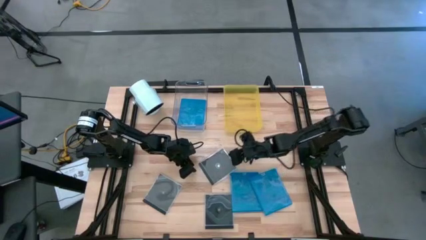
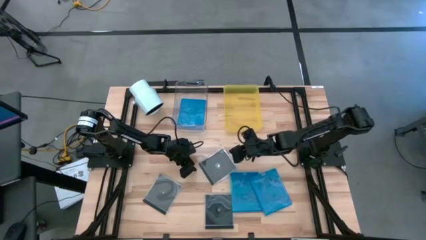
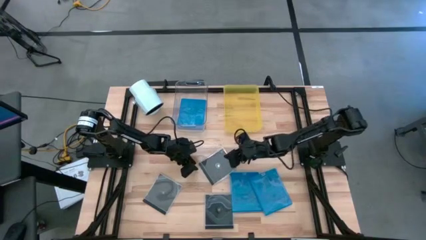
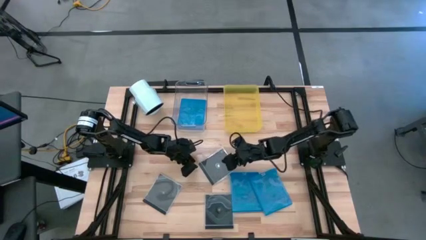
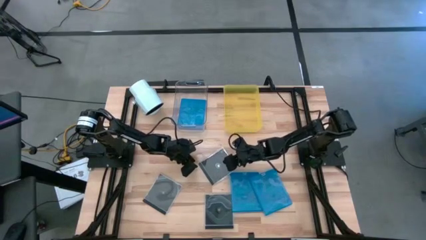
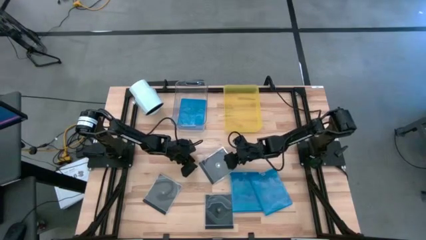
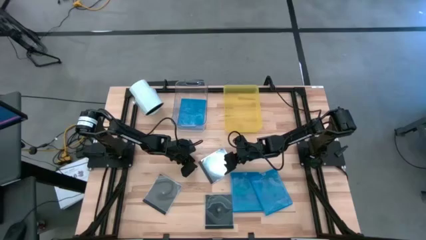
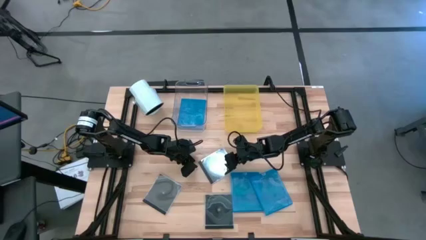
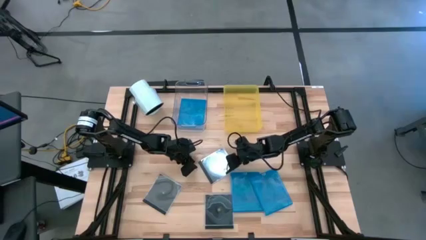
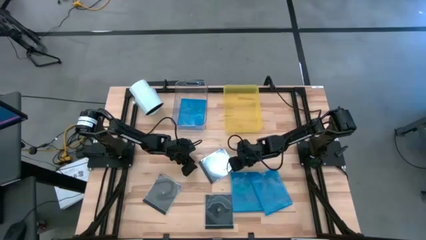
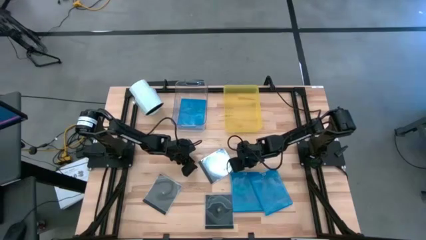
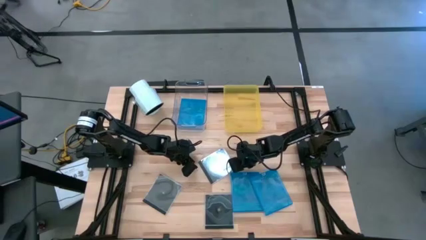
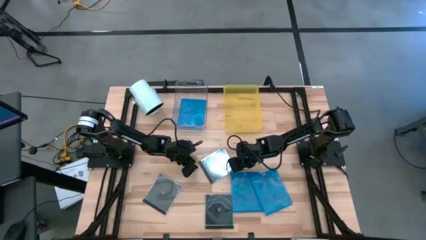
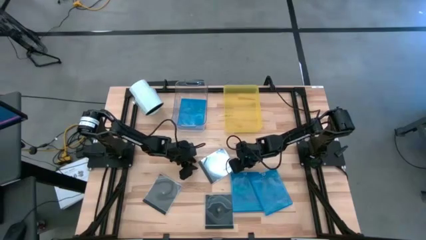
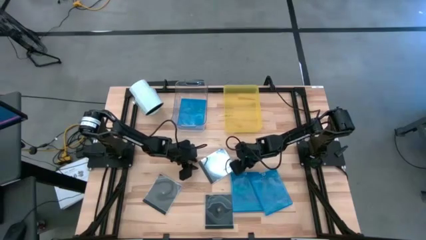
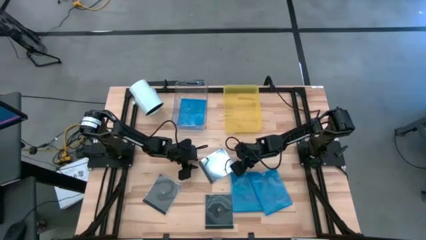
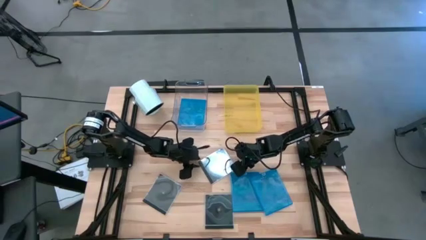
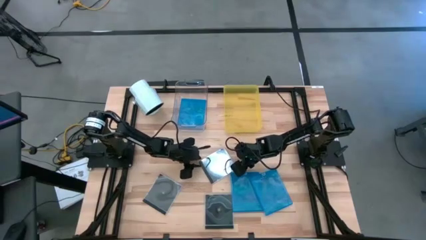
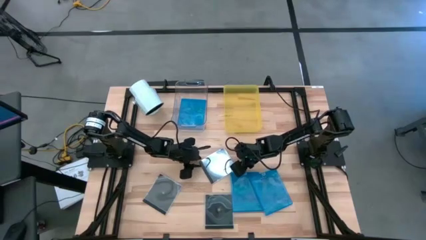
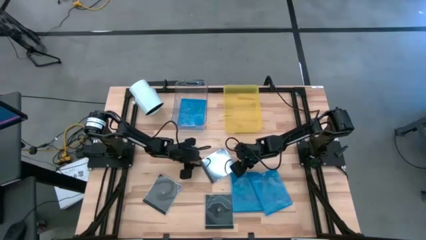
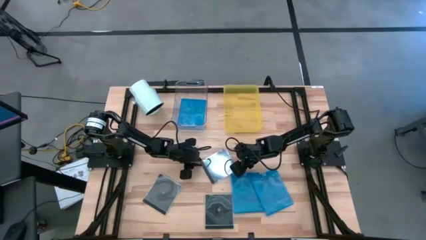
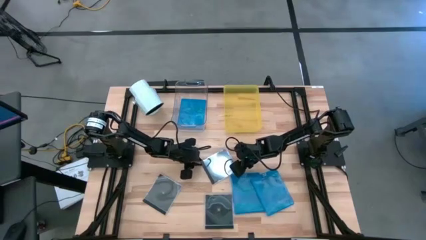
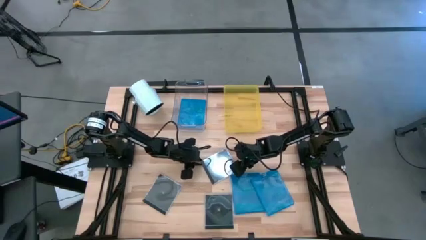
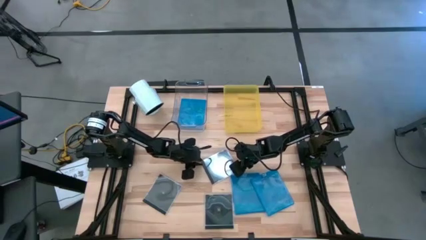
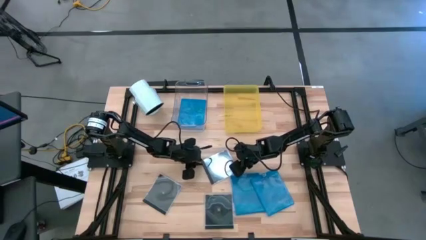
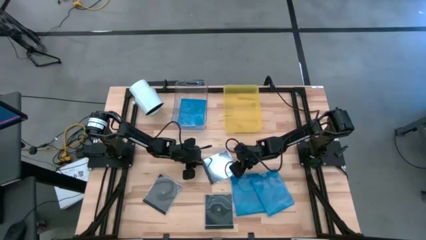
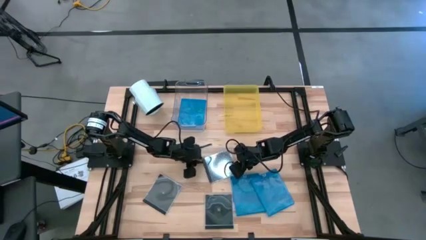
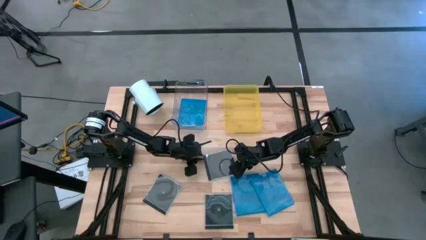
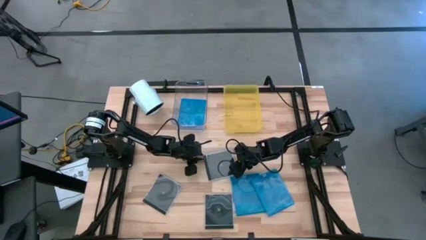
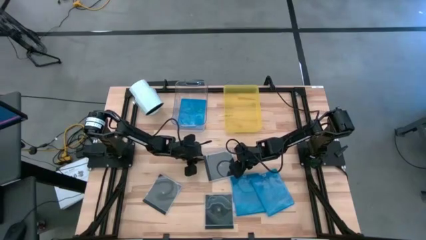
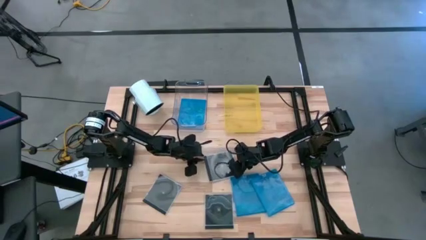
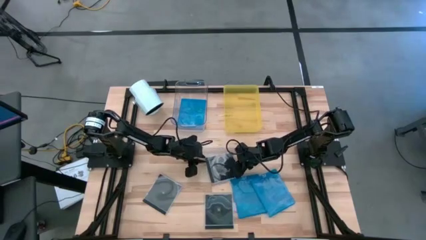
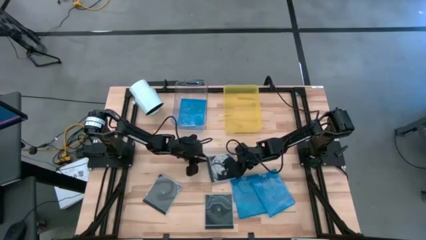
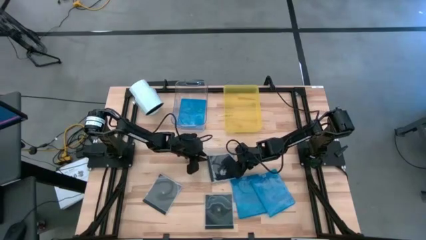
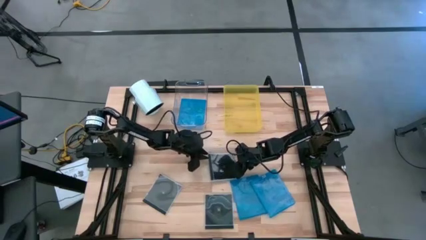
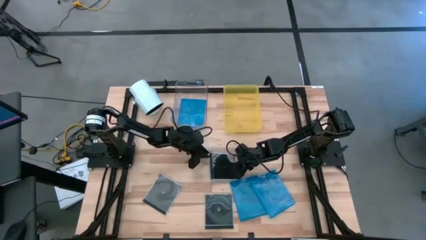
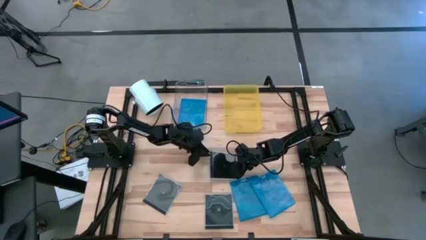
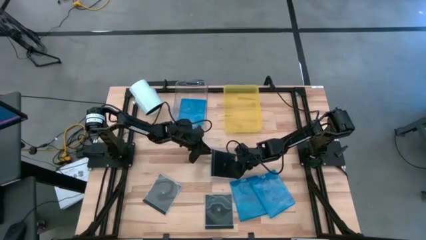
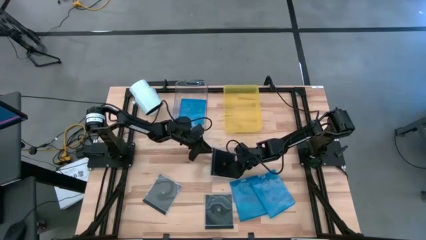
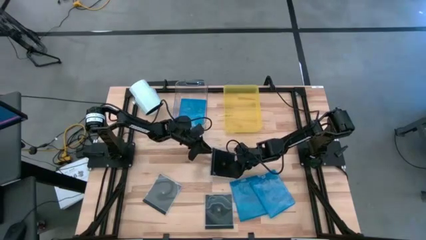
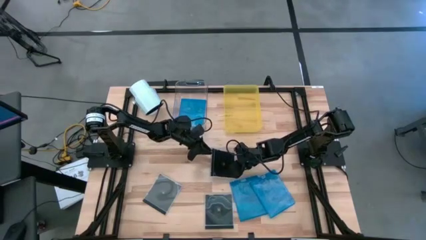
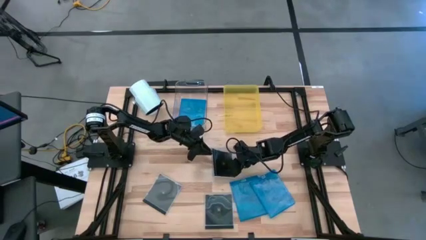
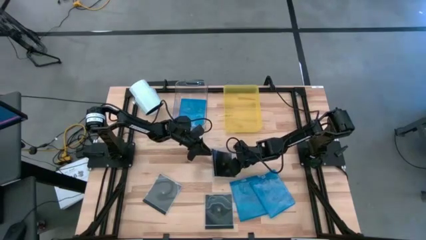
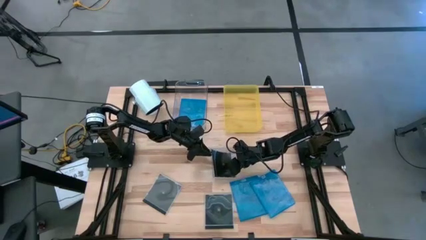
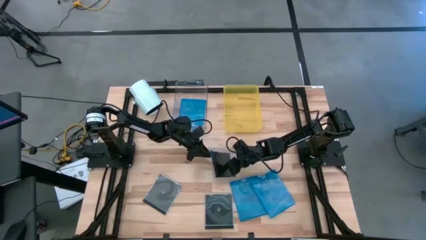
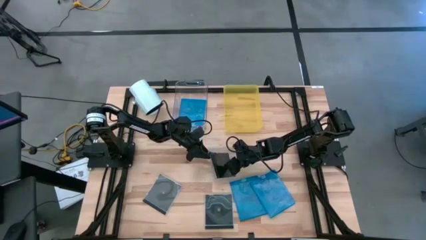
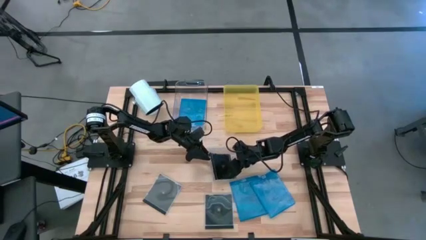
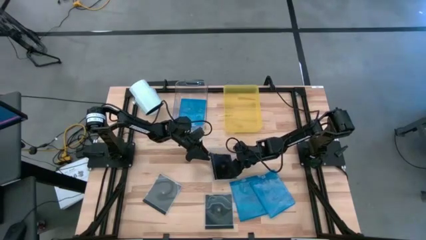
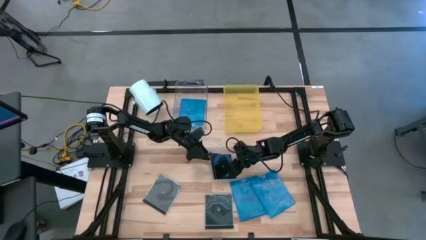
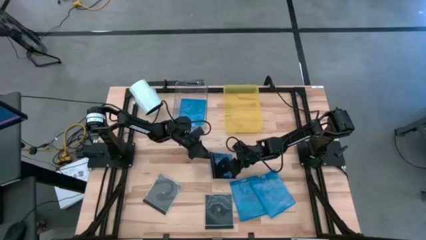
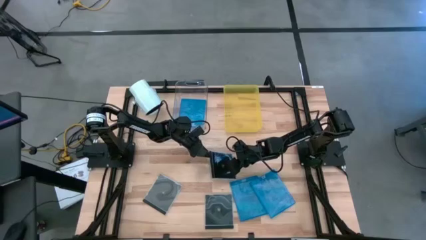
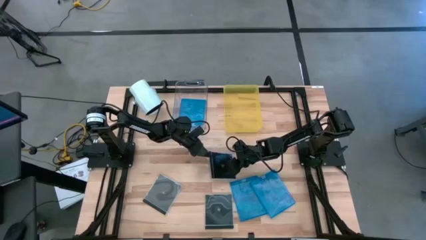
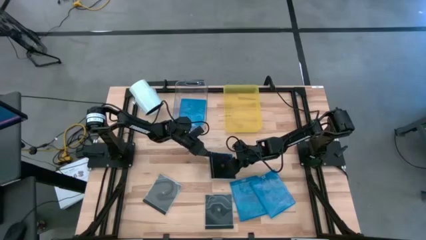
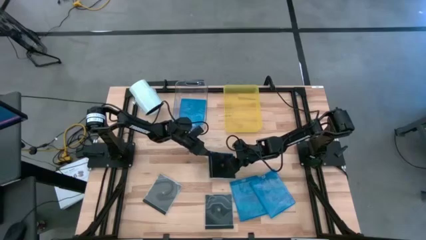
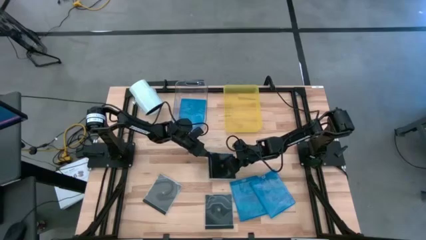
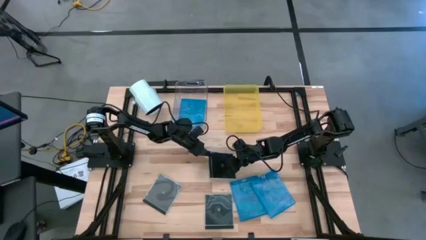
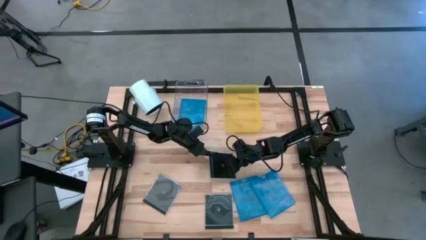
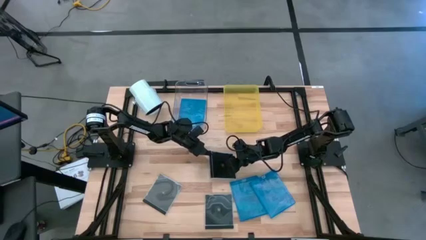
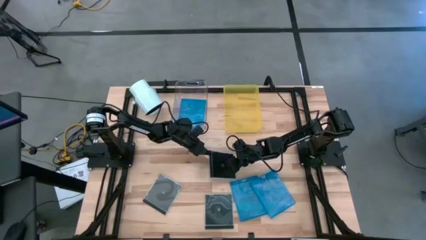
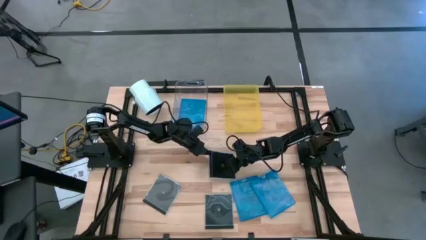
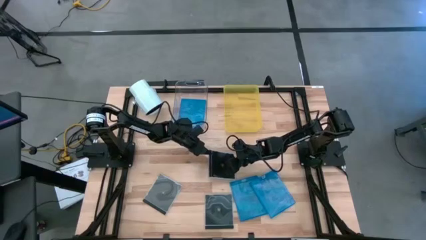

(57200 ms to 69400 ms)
Task: Pick & place jewel cases by type
Put the top right black CD case into the yellow bin

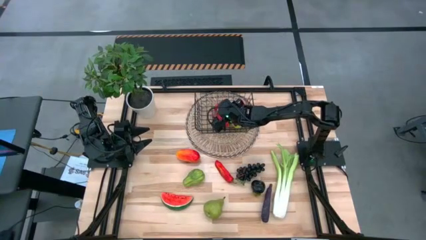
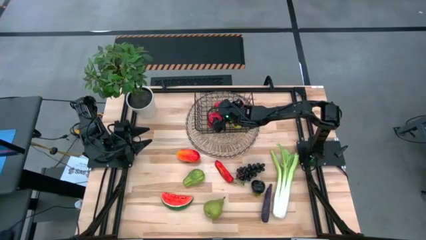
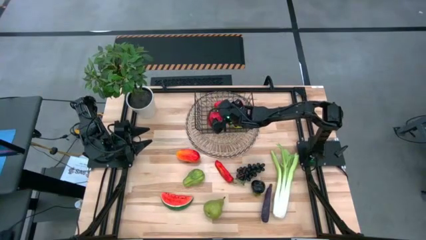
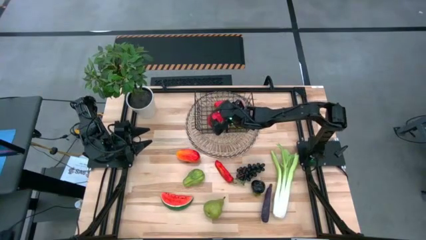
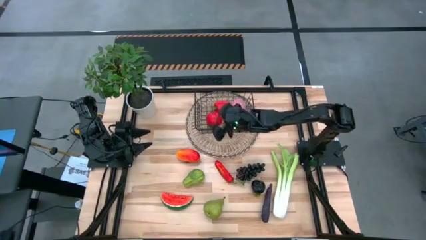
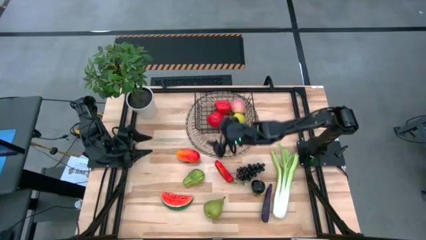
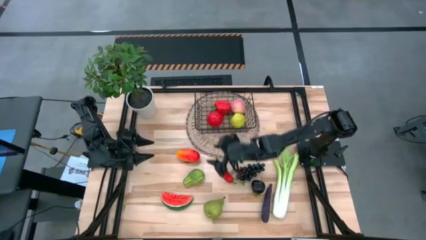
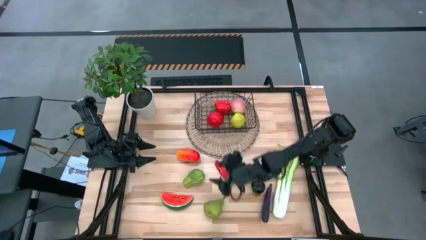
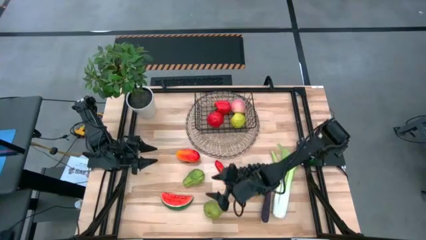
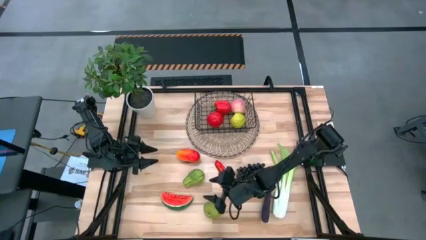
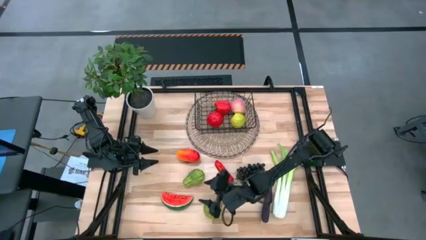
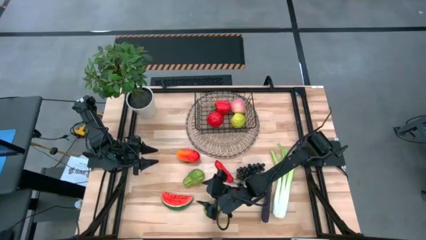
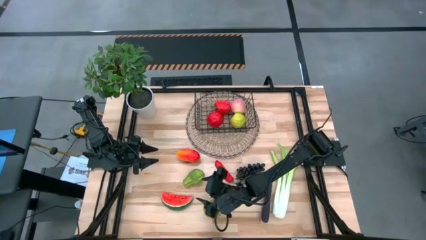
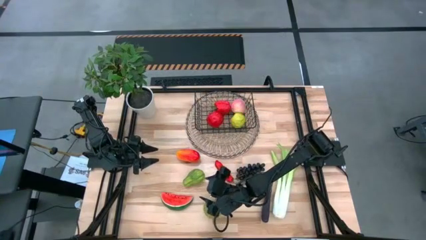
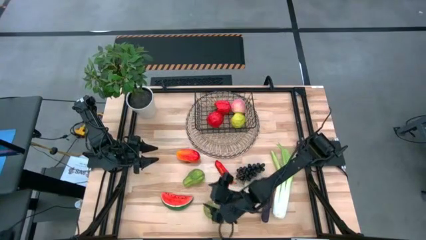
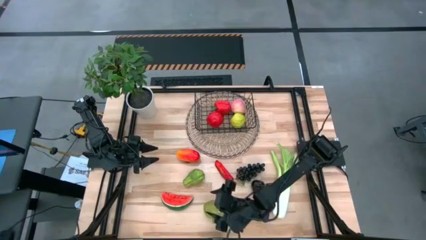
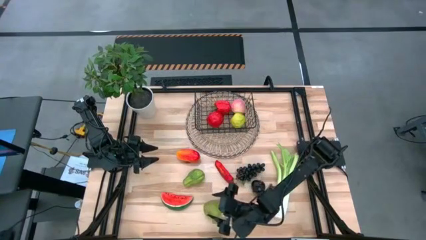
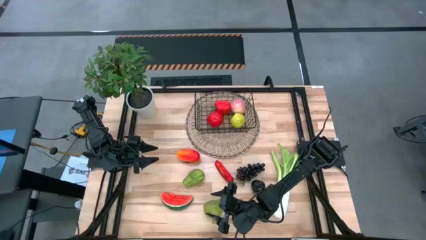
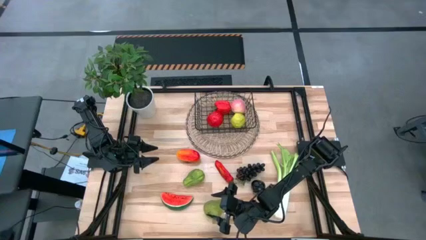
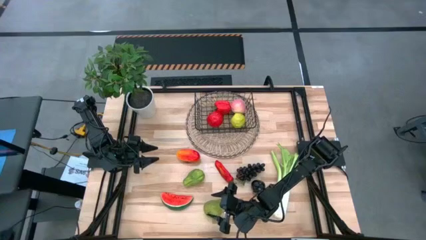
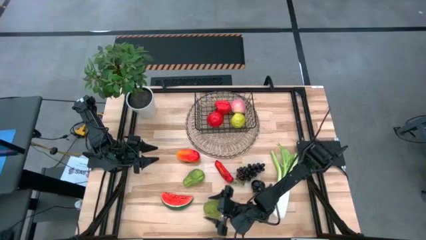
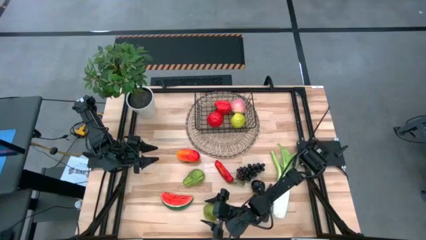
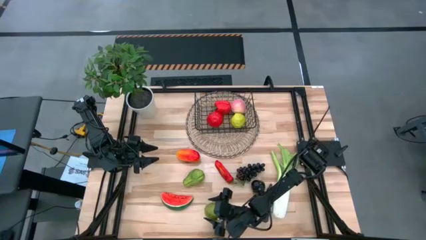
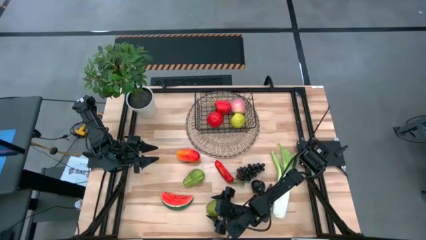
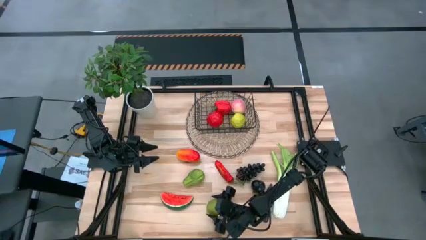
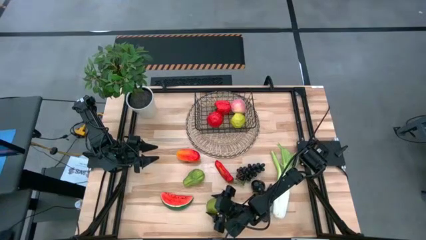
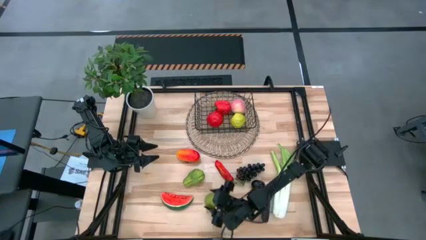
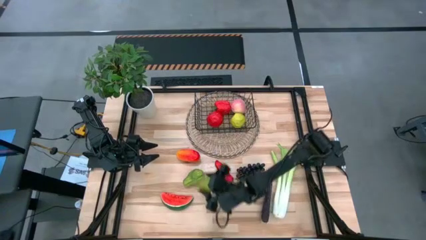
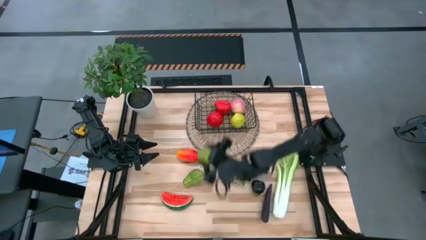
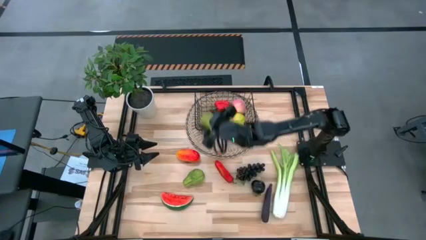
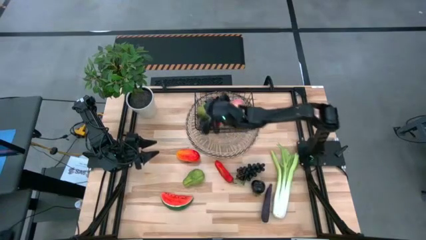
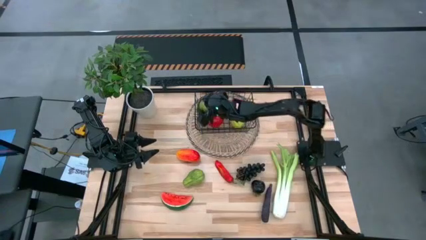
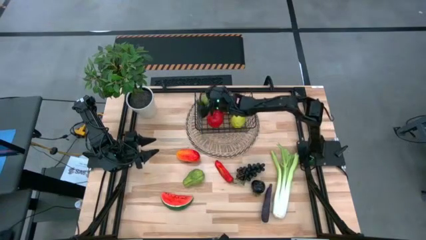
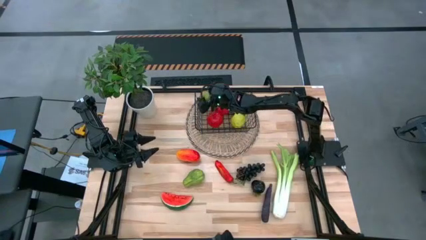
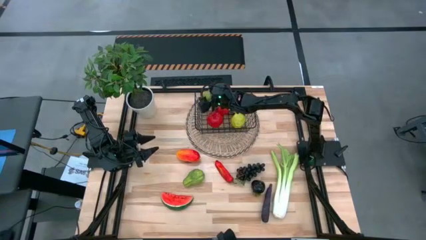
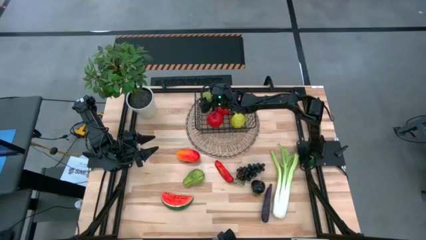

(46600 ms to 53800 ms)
Task: Build produce basket
Put the green pear into the black wire basket
